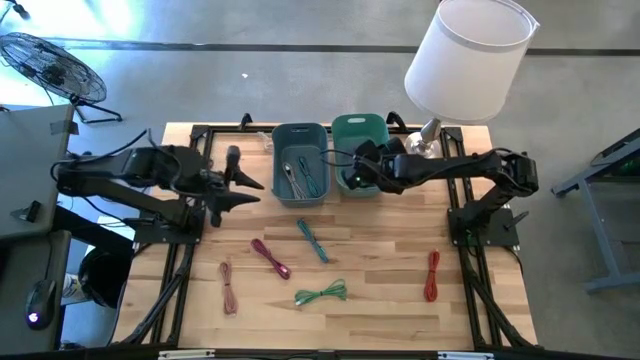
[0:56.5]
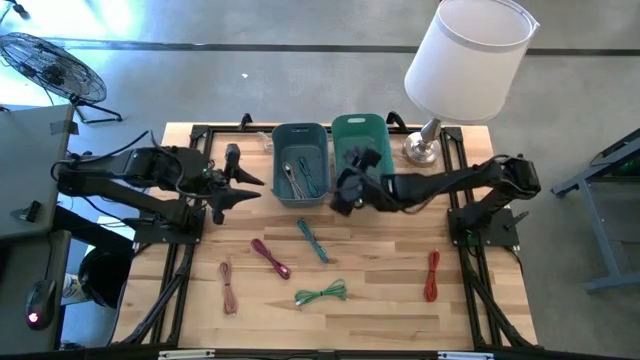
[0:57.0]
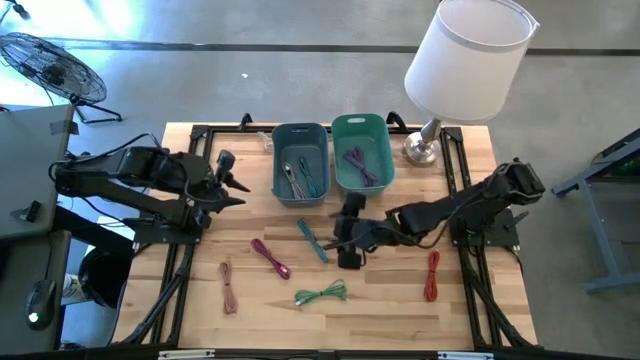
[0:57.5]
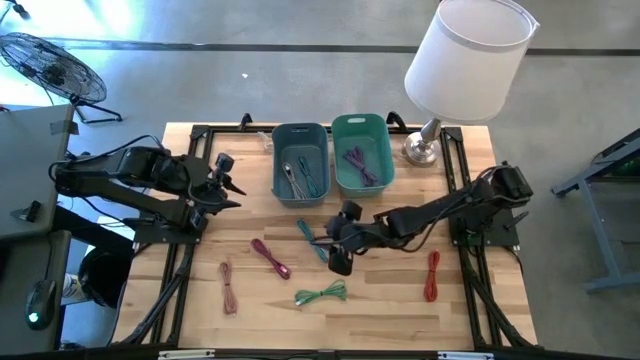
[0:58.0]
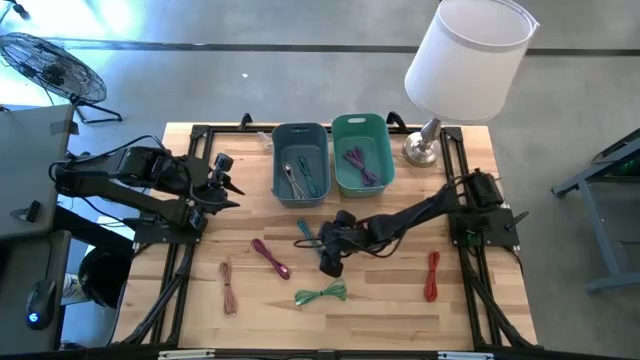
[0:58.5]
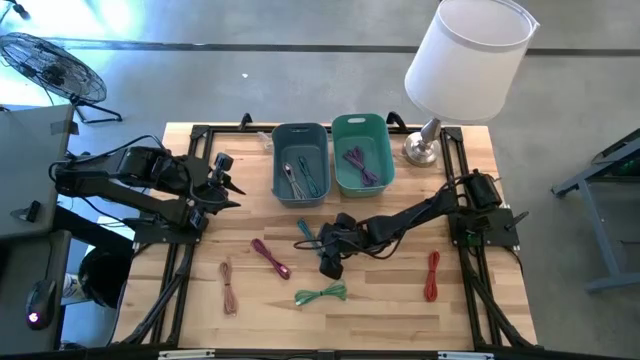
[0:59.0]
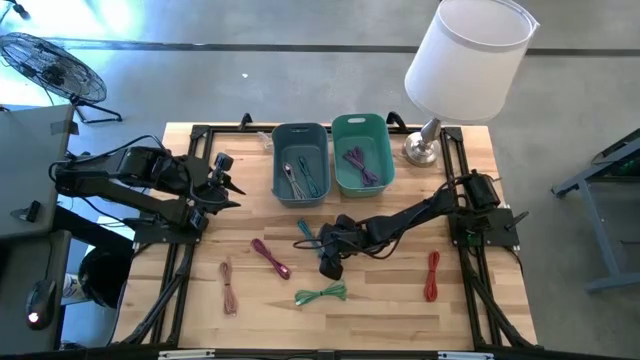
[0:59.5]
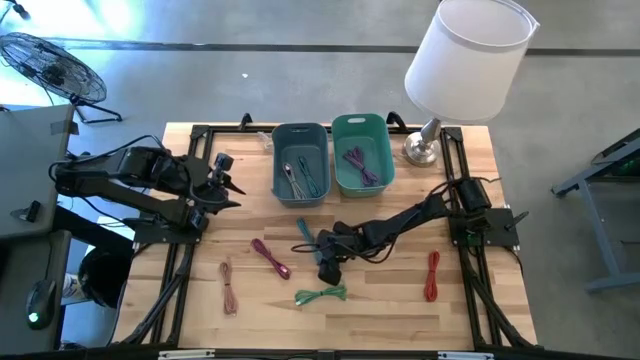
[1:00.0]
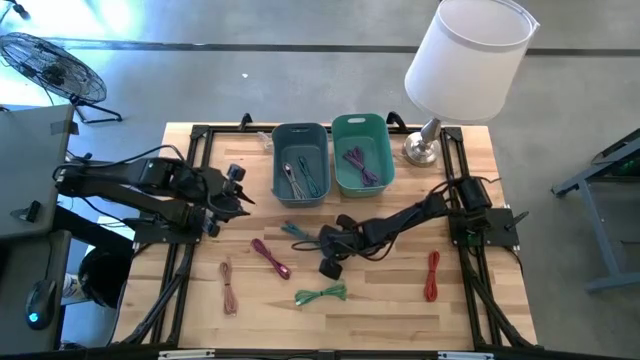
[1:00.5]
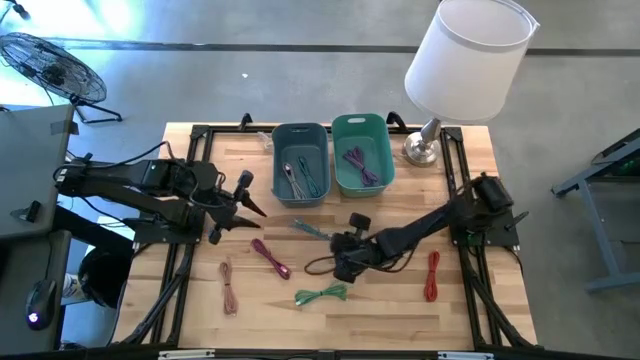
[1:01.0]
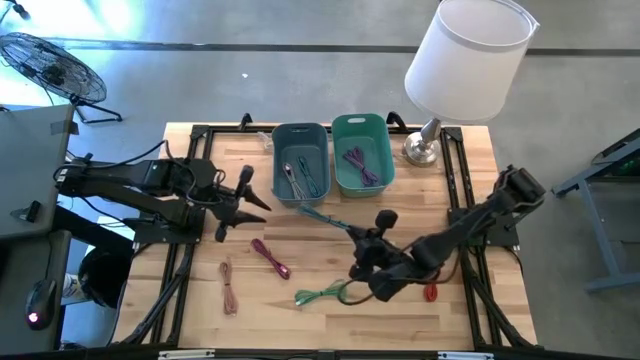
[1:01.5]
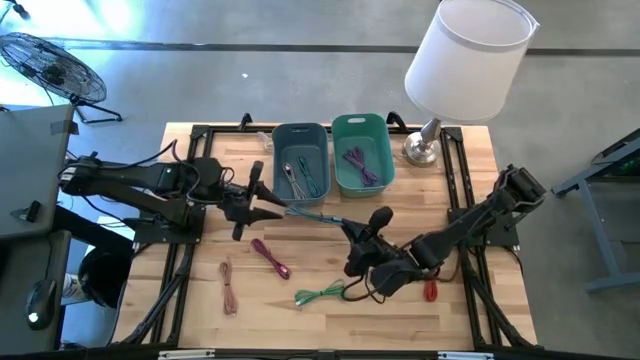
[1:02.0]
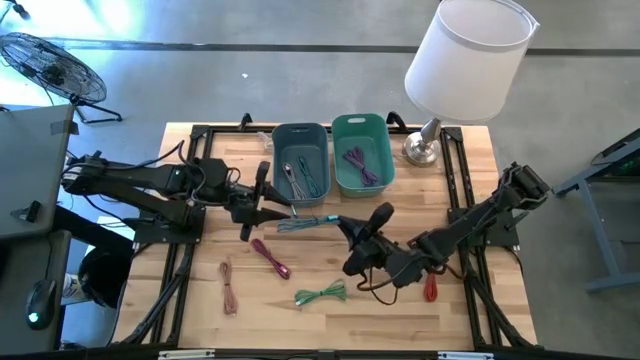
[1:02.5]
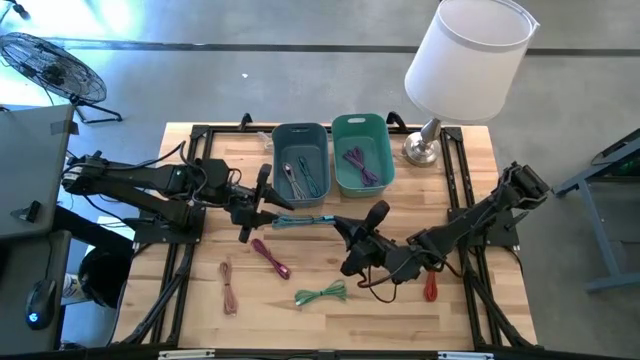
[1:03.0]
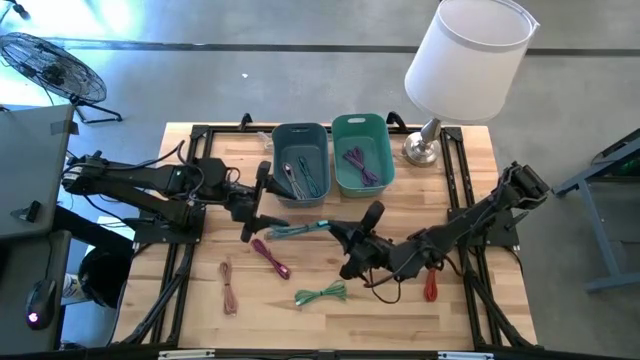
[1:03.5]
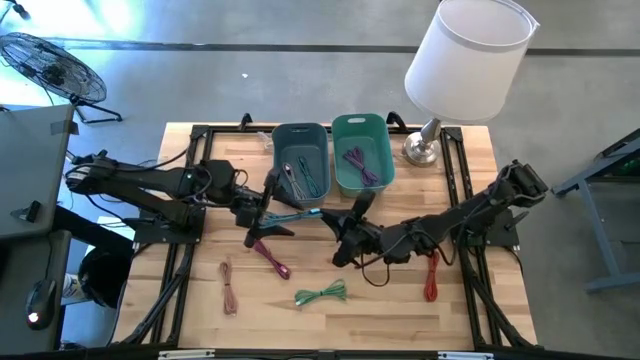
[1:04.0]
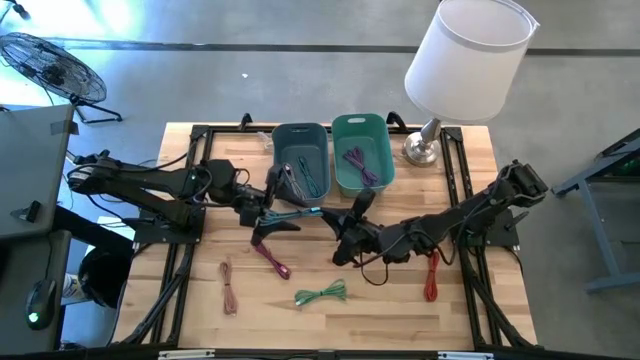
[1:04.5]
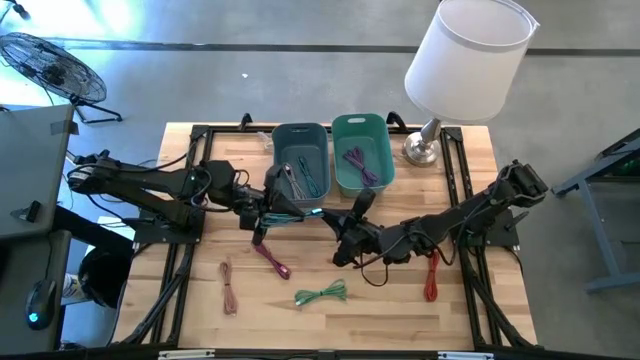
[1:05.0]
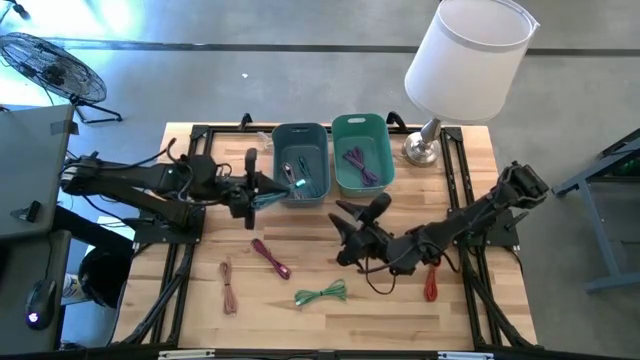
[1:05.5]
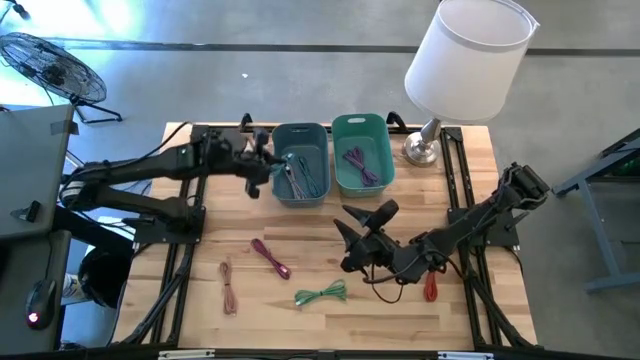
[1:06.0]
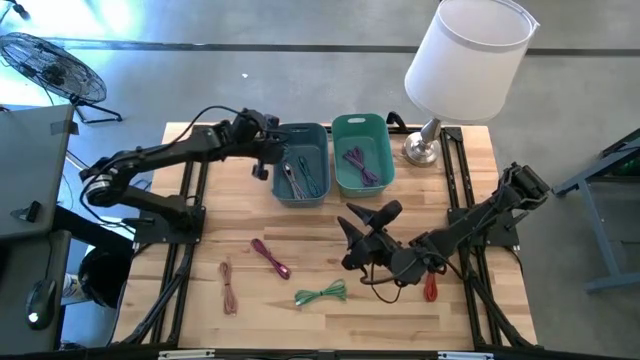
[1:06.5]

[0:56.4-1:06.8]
Task: Pick & Place USB Port
Put the blue charger cable into the blue bin

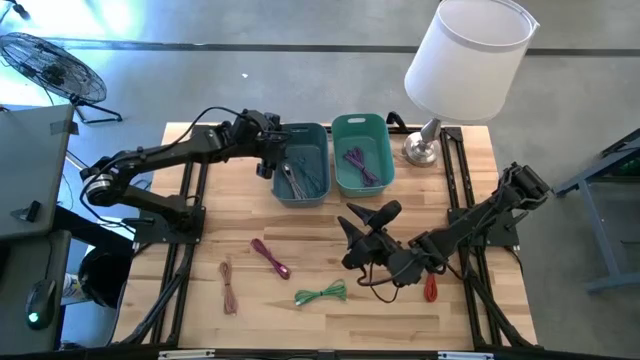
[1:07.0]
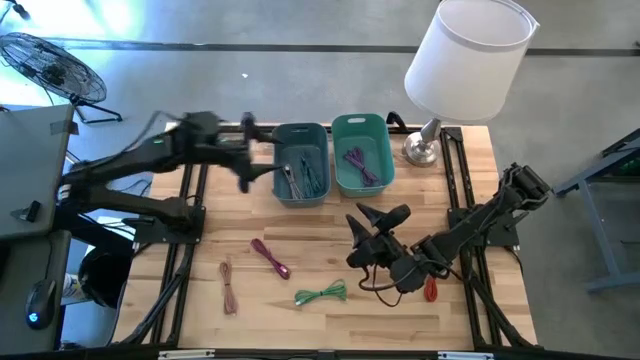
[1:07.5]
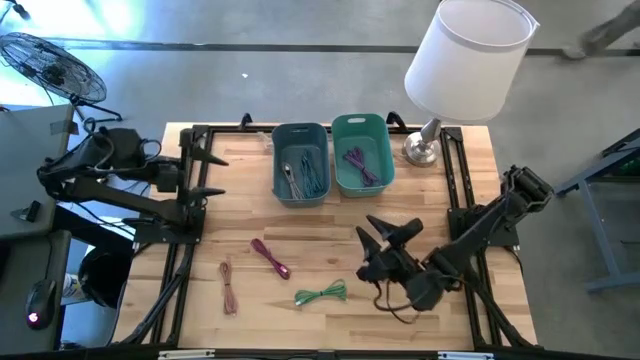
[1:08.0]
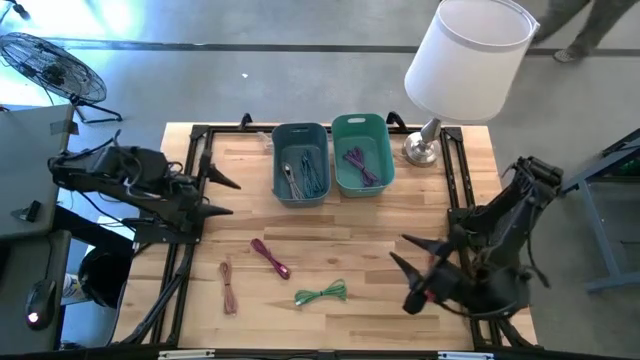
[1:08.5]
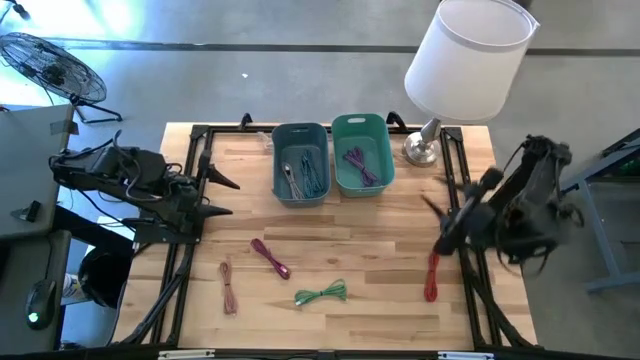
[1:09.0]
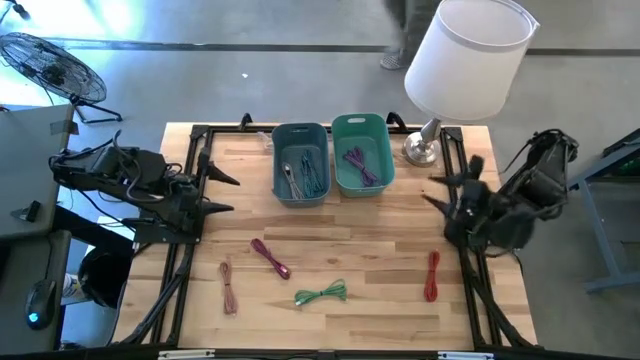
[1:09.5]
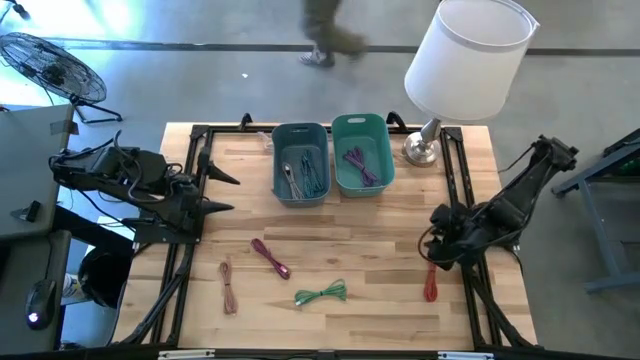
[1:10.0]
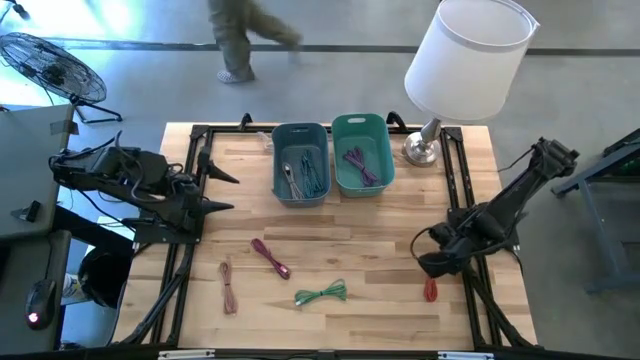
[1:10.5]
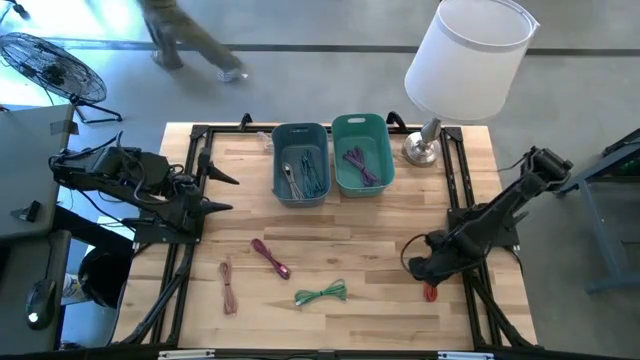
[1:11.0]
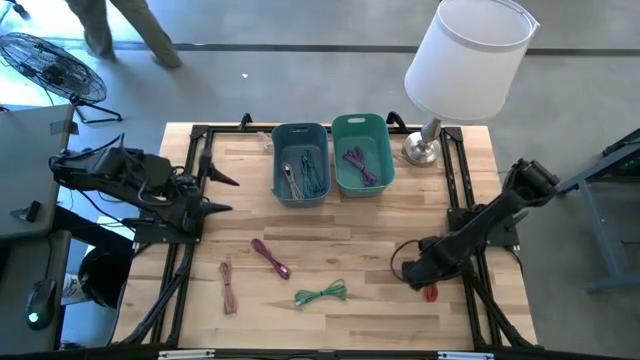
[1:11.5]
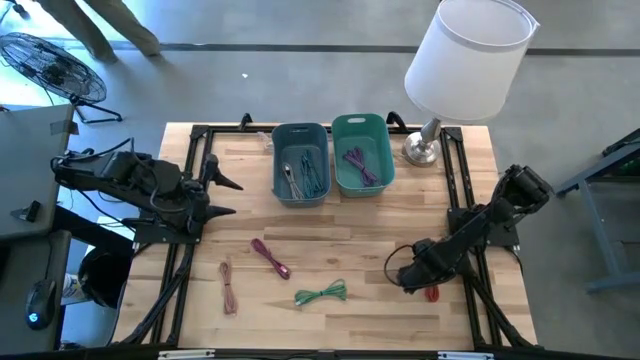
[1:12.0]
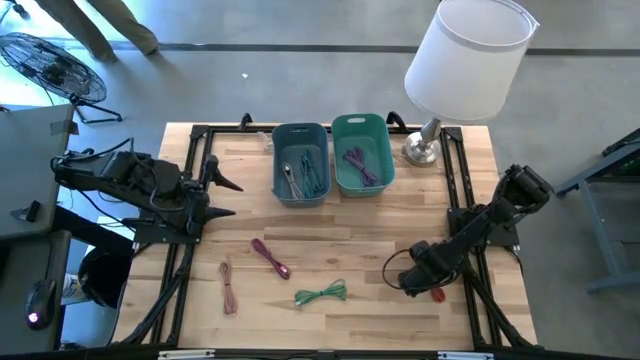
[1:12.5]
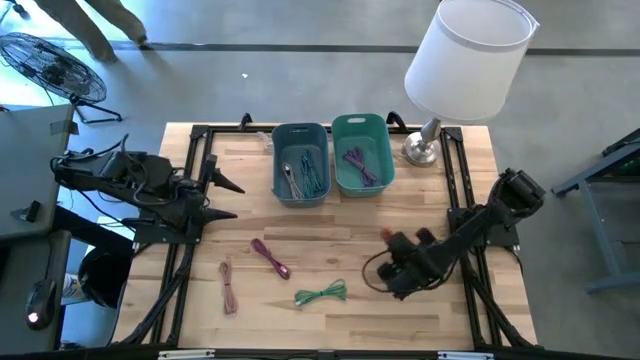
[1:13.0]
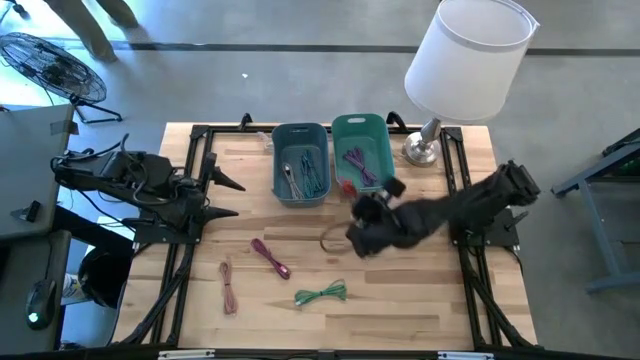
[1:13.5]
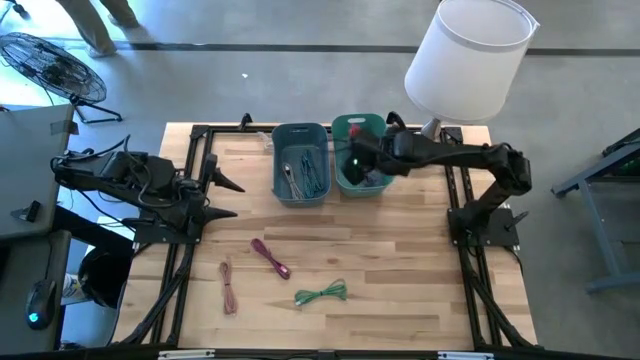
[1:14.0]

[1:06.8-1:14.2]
Put the red charger cable into the green bin

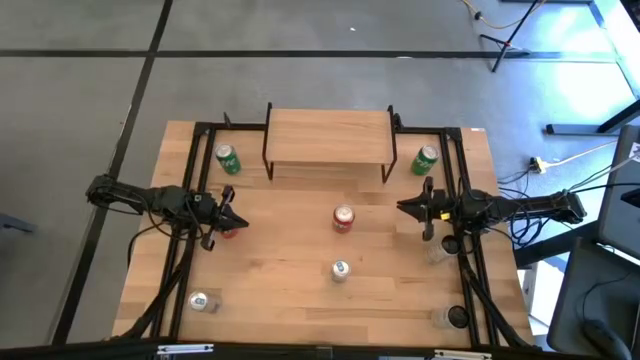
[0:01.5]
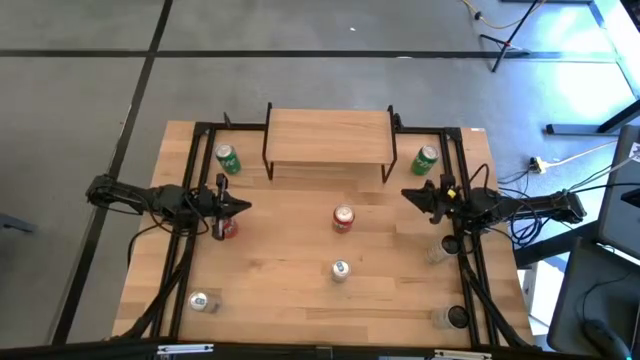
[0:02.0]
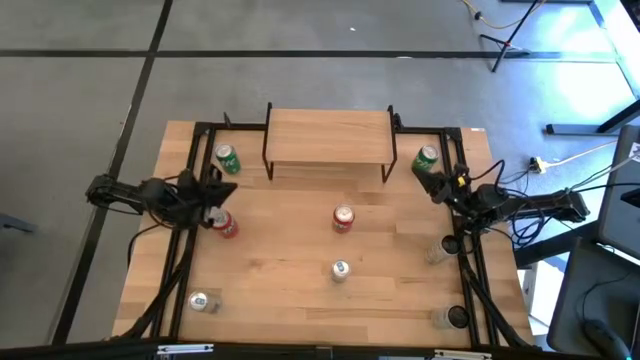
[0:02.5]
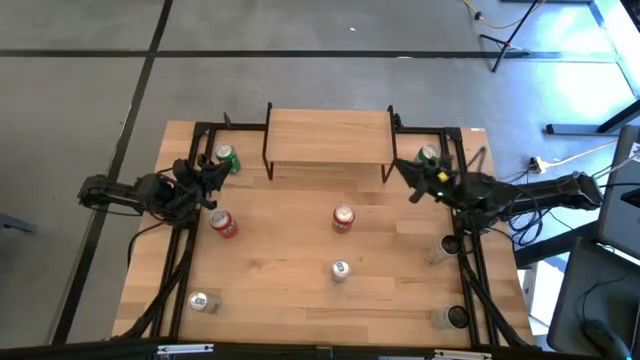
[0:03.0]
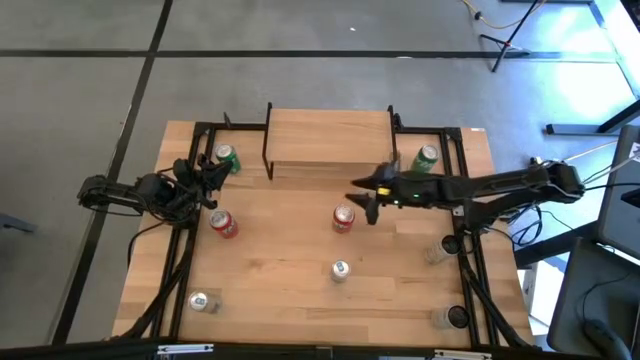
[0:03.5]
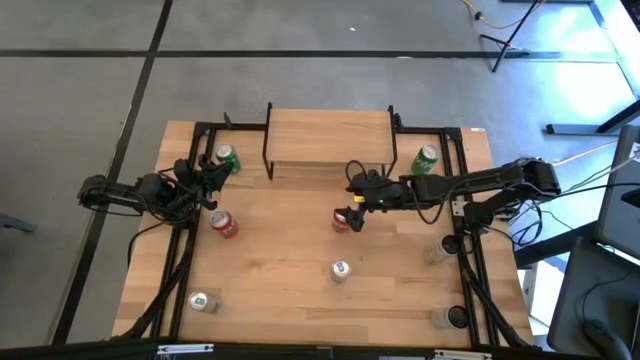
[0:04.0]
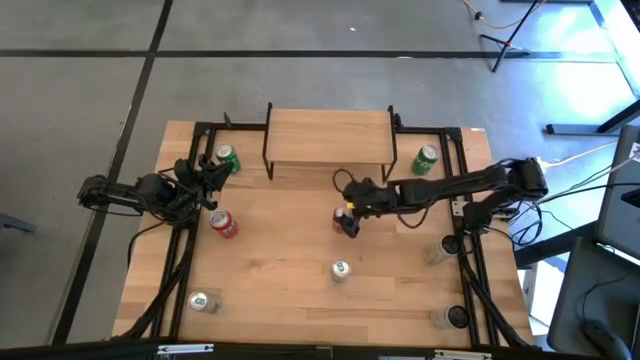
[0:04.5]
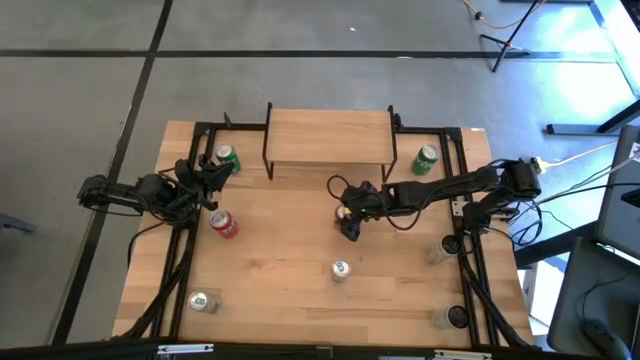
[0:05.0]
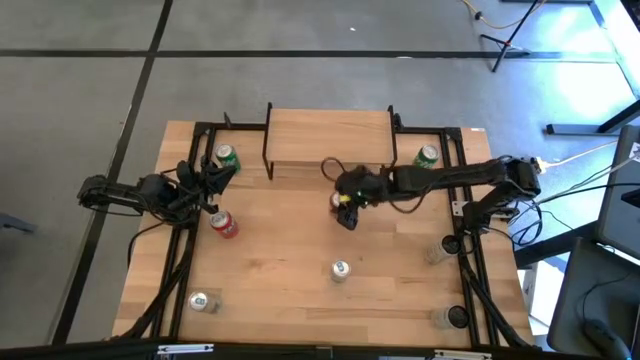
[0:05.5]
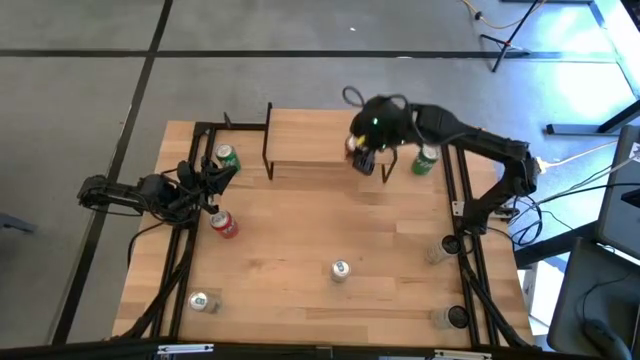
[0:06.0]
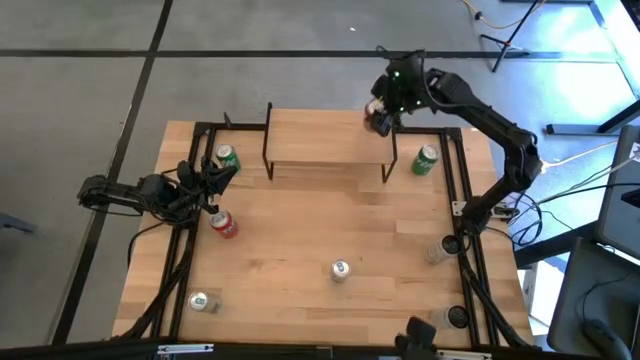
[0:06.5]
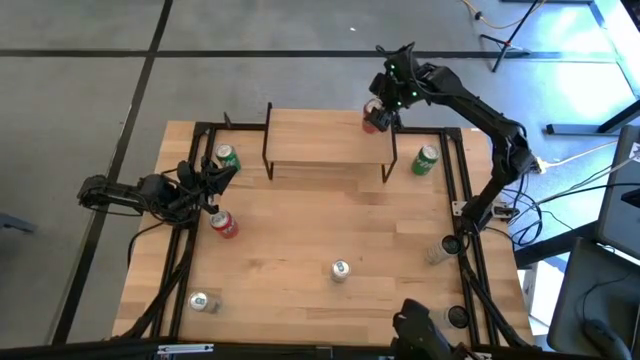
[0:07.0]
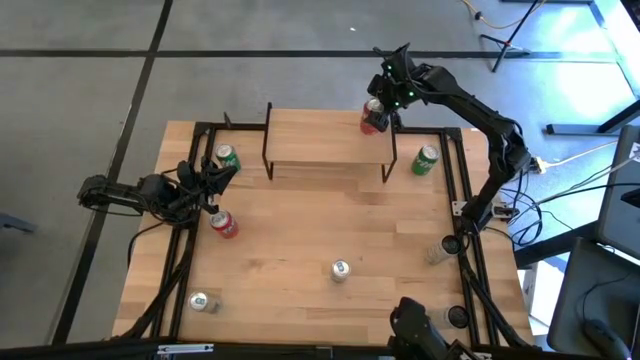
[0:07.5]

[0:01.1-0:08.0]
Task: Place canned beverage on shelf
Put the right red soda can on the shelf
